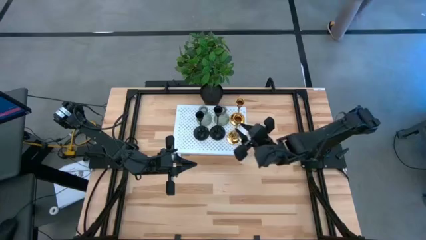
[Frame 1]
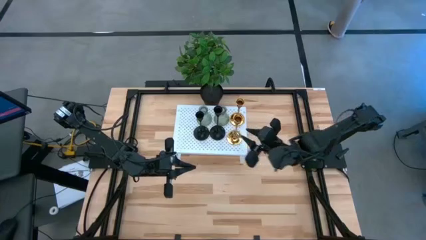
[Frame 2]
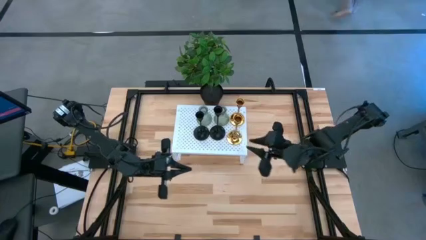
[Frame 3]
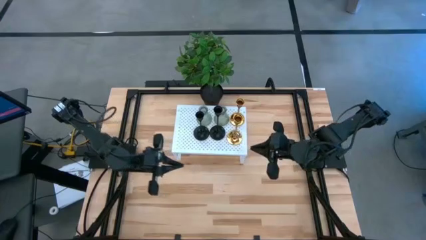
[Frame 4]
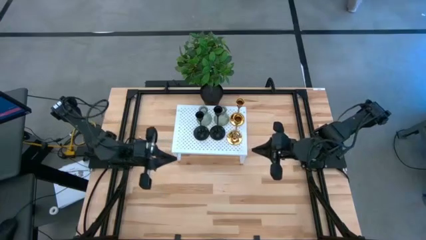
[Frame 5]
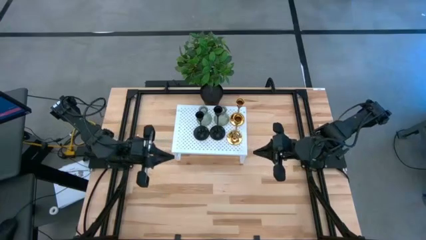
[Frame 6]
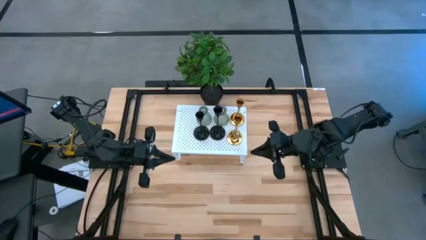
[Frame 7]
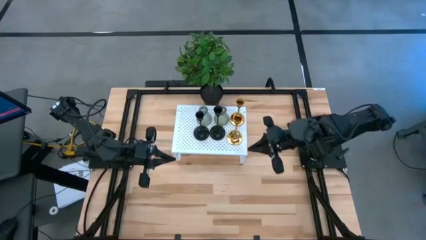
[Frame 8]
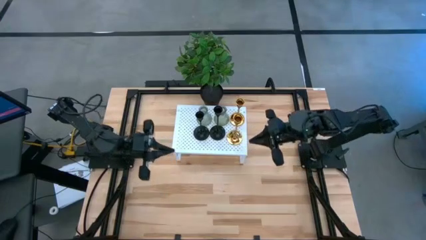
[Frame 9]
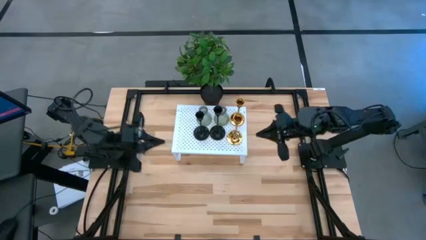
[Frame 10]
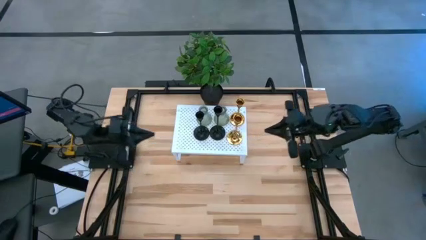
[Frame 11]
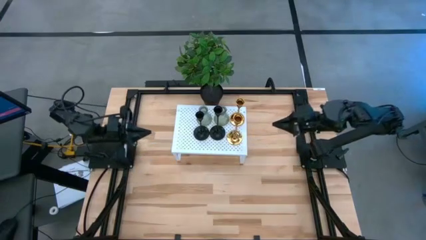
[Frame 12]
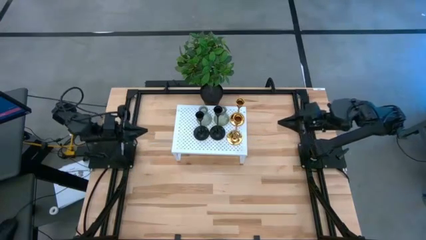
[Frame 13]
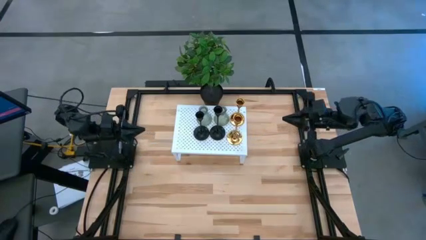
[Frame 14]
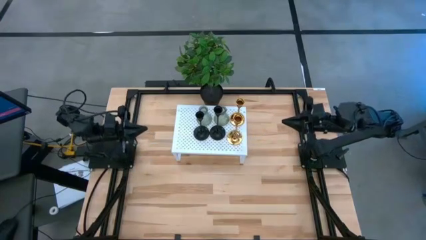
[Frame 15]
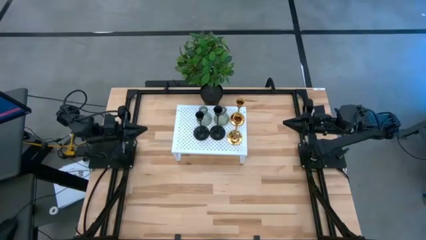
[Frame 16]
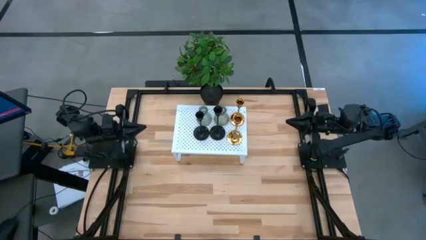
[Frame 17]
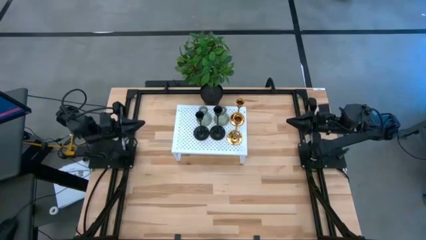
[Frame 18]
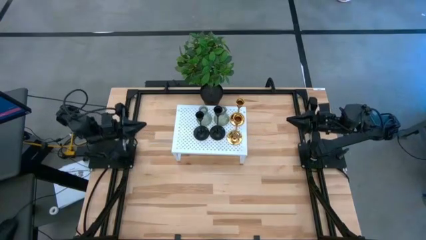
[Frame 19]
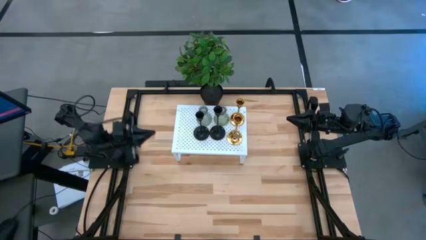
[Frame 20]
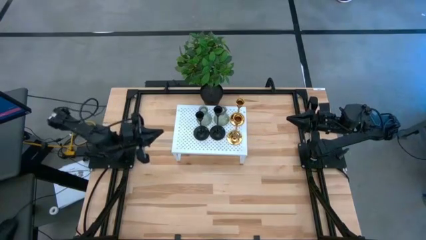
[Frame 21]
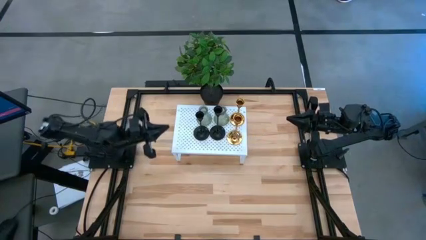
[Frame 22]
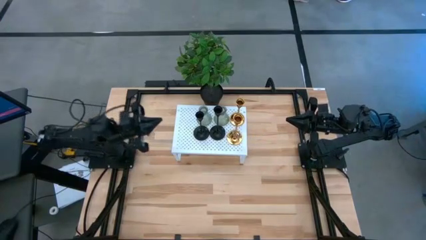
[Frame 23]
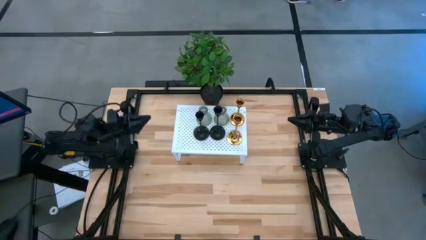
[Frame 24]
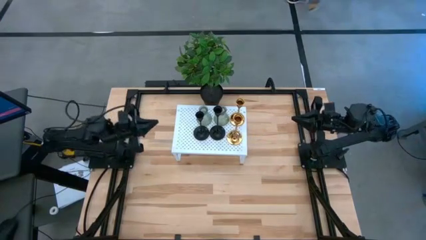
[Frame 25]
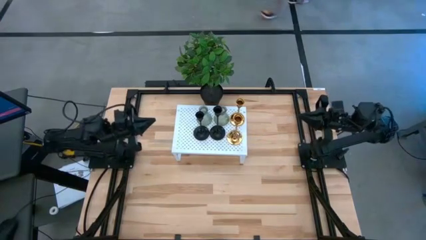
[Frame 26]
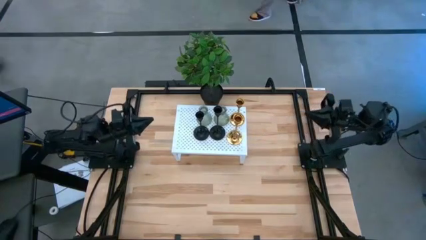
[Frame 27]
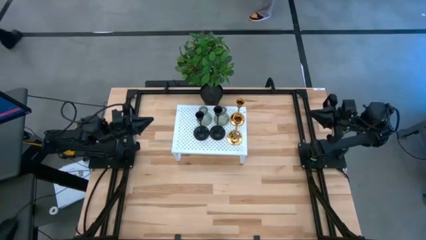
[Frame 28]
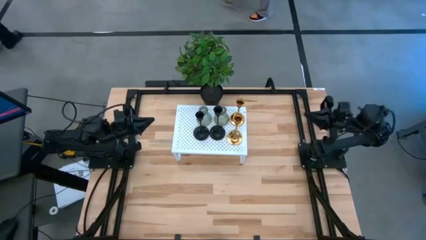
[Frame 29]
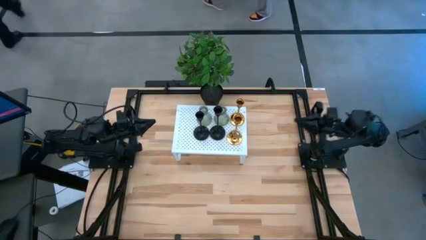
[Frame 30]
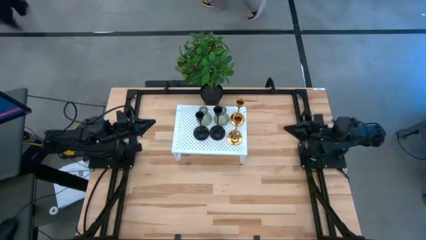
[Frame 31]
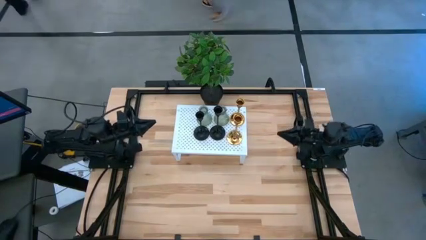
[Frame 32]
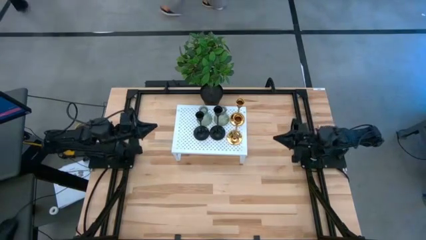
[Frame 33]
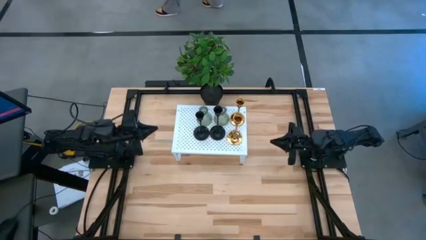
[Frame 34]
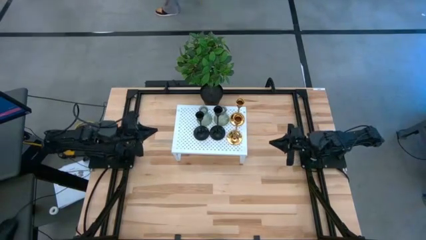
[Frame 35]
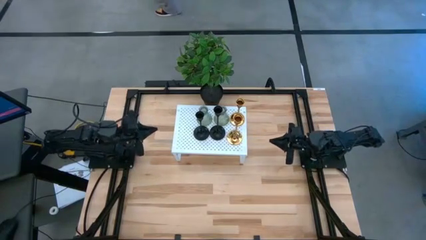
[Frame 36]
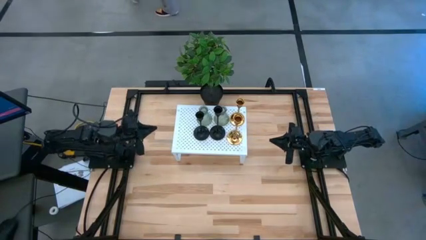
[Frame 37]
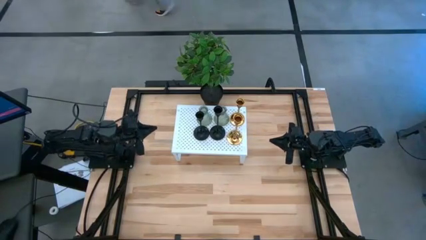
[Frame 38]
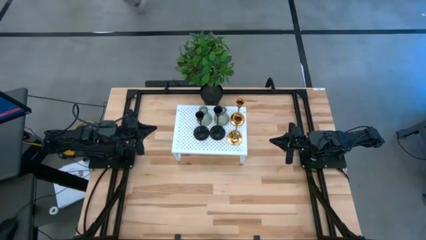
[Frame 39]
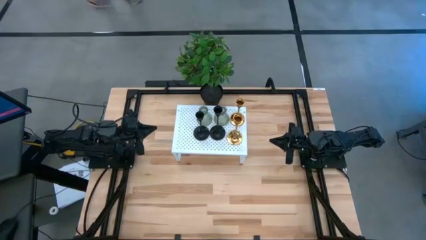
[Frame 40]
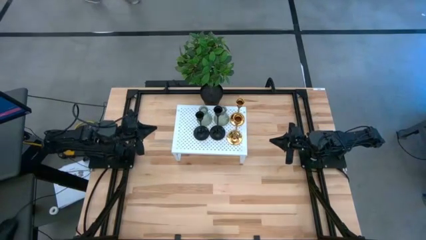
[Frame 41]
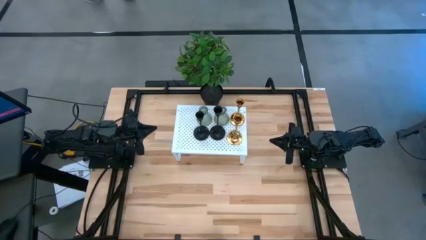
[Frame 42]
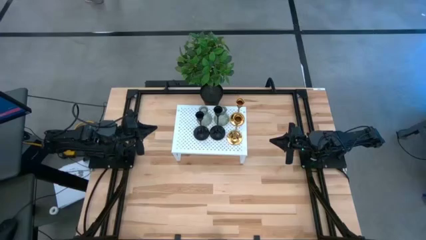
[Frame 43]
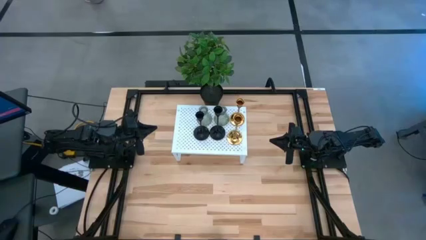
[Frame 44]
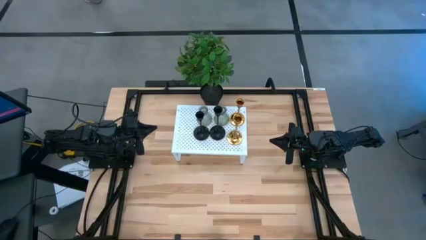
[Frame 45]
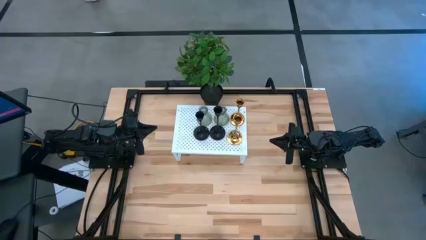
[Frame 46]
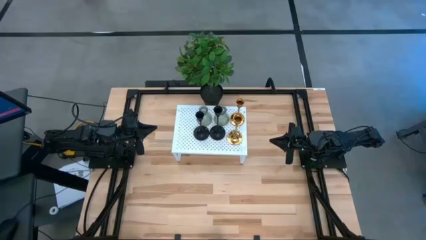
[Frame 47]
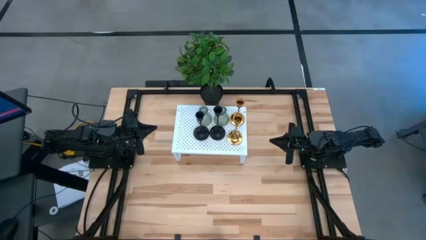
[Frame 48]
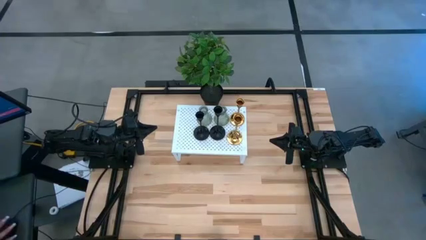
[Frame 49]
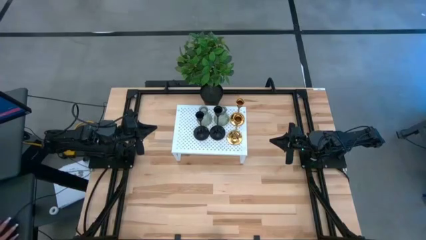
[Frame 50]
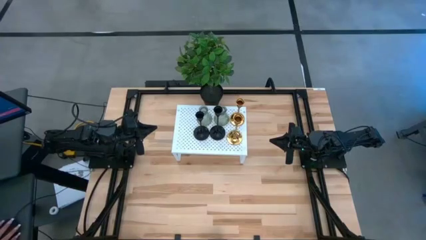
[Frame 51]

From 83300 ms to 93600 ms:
Task: Pick & Place candle stick holders
Return to Home Position

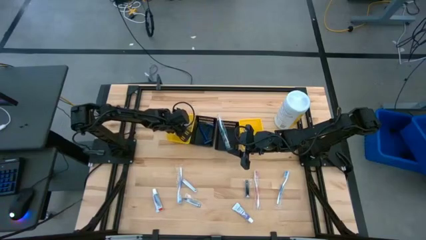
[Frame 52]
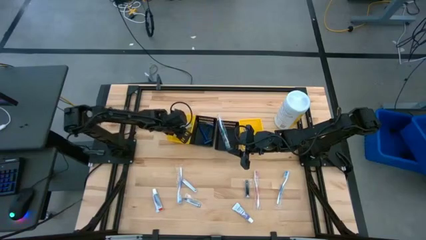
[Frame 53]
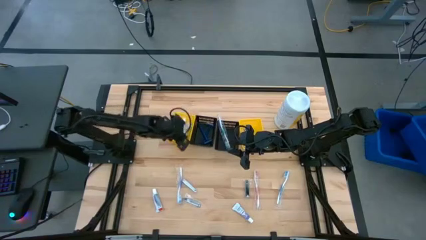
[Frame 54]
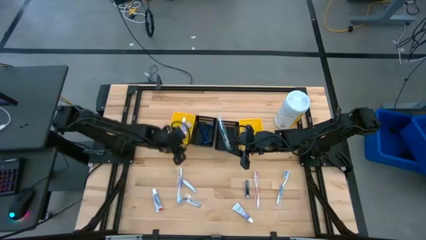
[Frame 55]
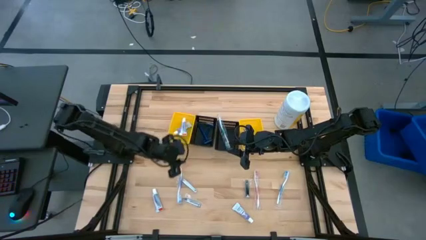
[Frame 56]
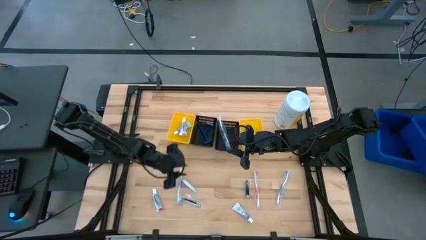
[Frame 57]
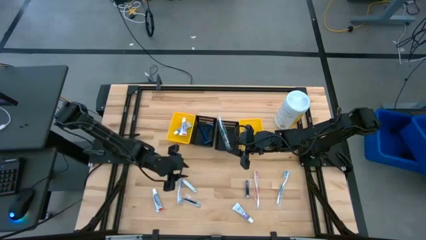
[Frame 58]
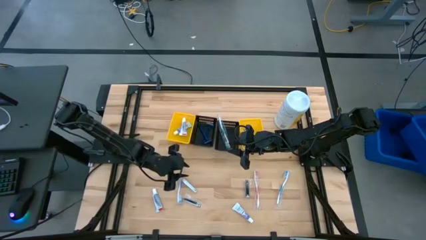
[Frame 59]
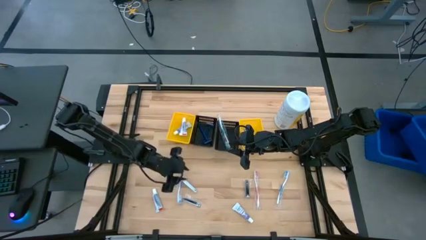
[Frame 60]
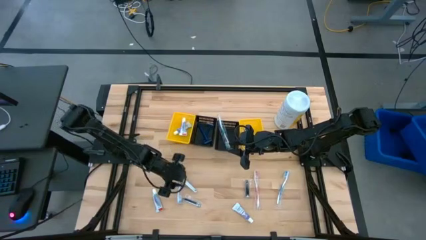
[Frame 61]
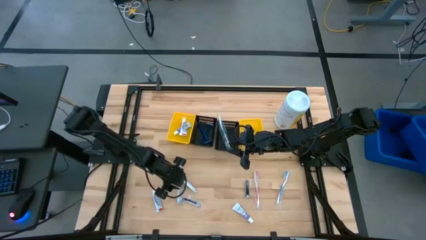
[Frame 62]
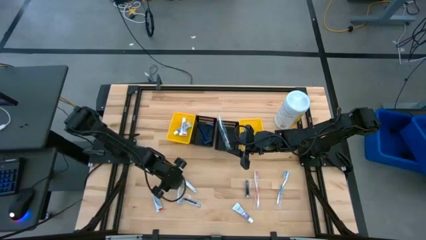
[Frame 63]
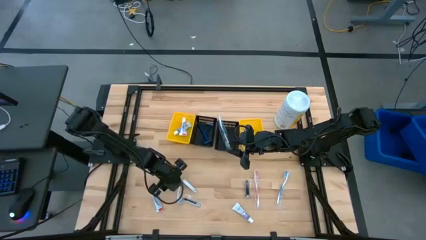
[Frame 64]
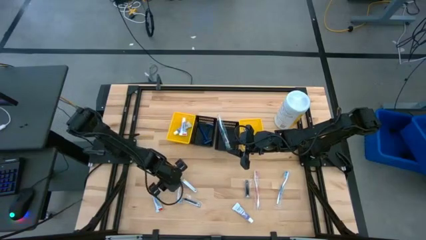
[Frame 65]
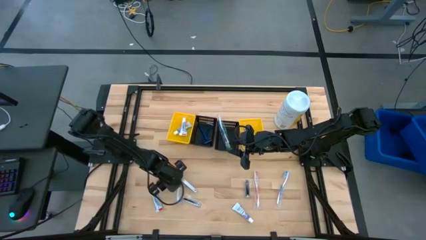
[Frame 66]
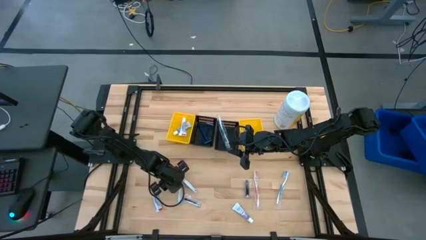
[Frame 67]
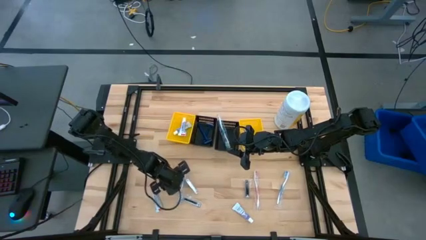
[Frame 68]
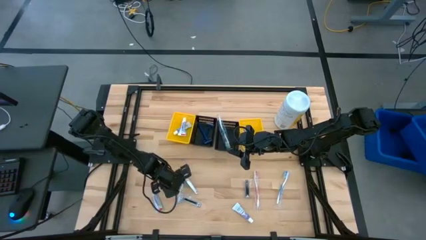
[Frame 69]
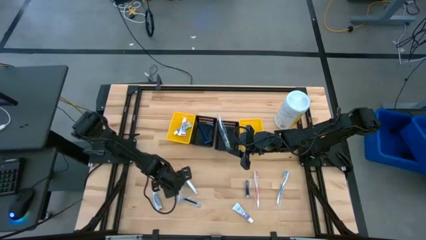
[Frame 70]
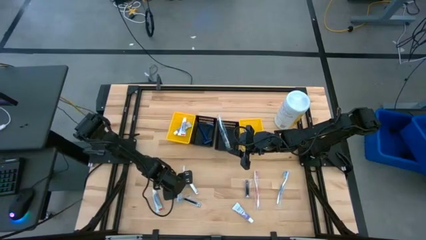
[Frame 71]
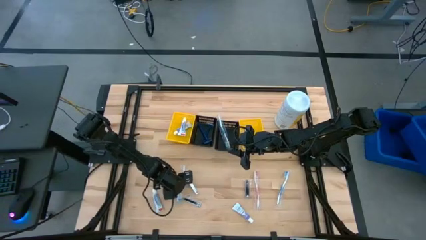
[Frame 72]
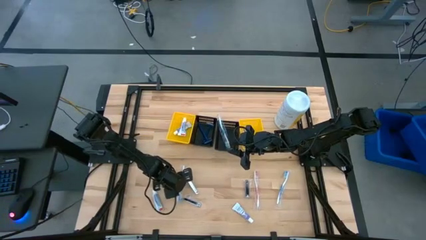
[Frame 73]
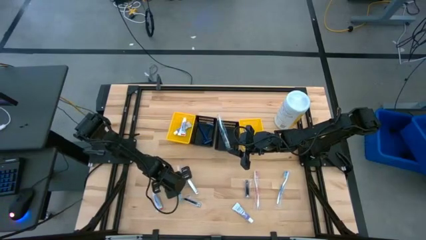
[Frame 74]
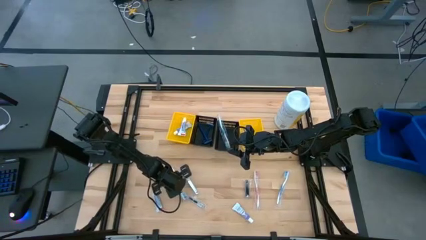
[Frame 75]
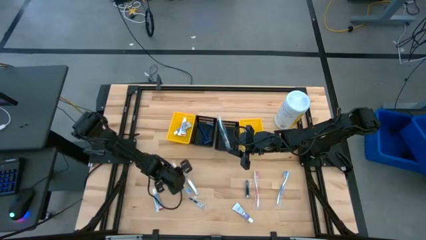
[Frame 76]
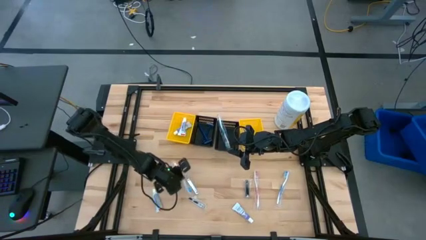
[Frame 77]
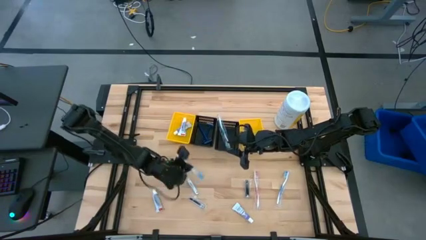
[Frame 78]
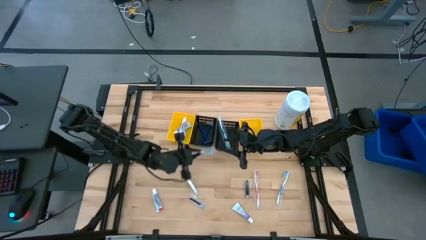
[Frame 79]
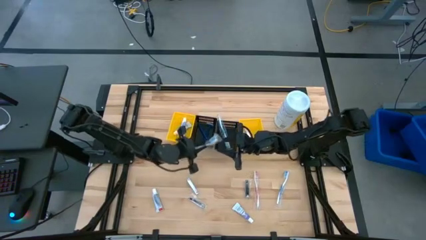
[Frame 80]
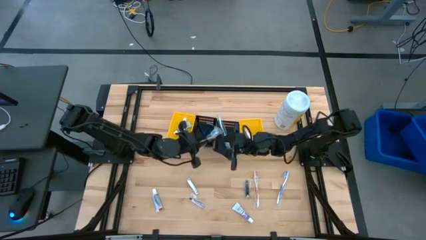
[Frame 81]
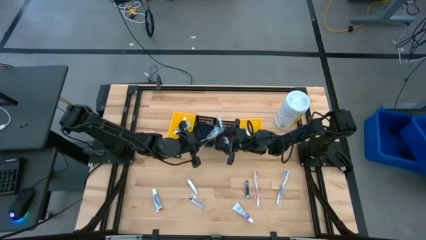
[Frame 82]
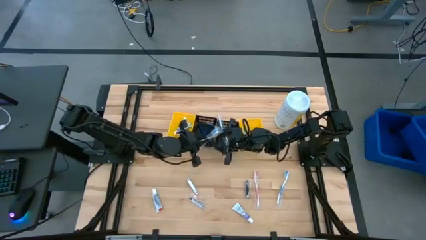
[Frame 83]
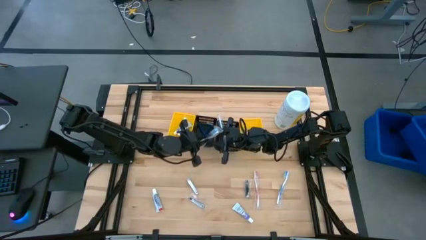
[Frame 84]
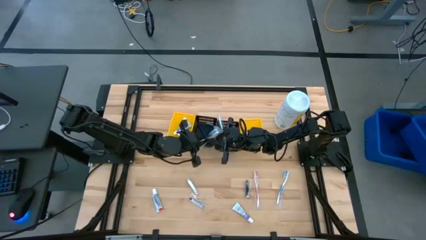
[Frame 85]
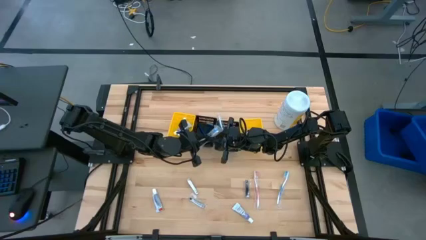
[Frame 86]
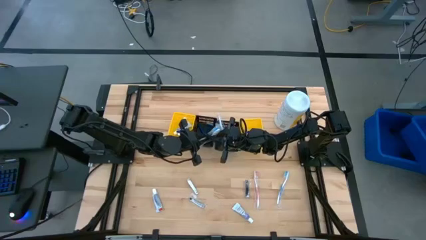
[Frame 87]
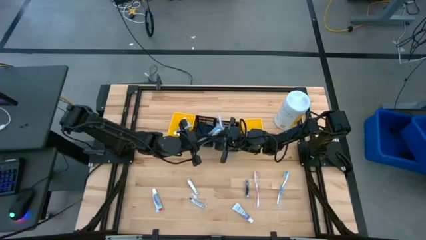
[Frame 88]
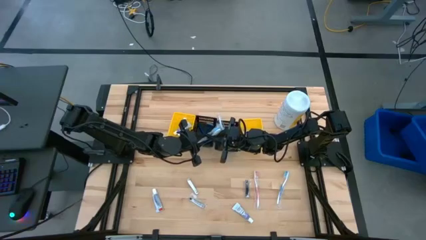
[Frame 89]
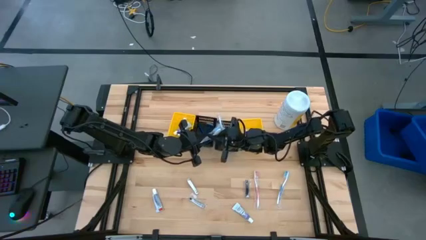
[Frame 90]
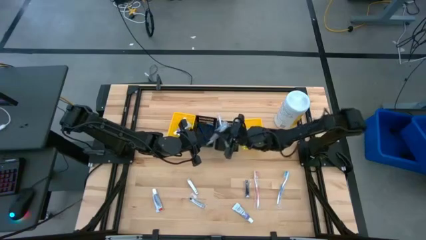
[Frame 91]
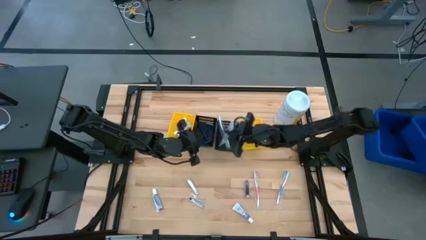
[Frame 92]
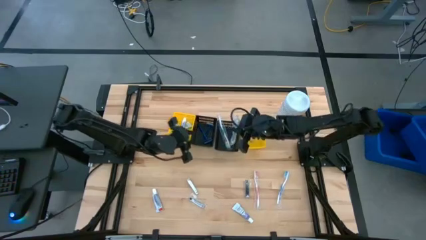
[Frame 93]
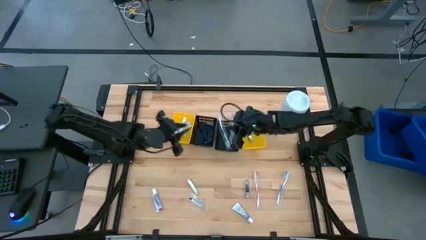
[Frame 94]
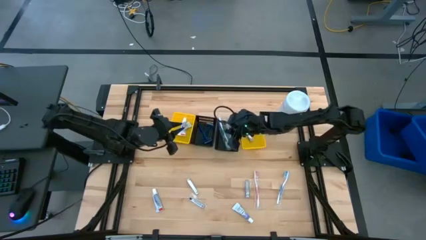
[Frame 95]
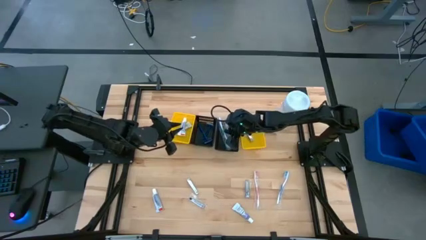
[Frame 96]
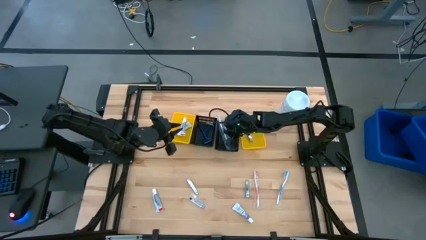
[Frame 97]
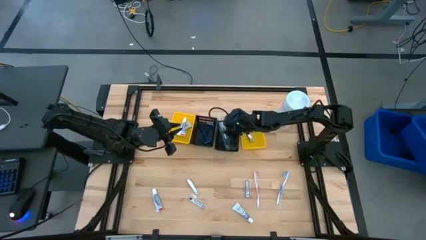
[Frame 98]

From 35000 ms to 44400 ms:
Task: Pick & Place Travel size toiletries
Put the blue toothbrush into the right black bin
